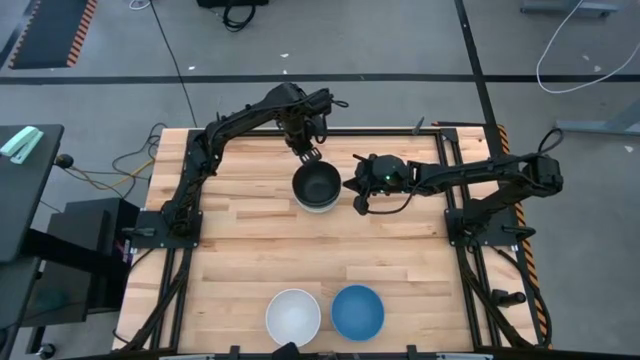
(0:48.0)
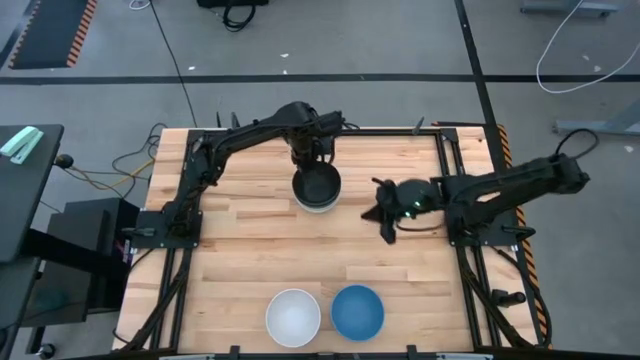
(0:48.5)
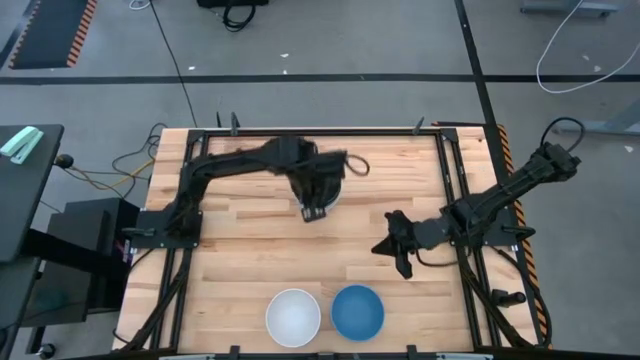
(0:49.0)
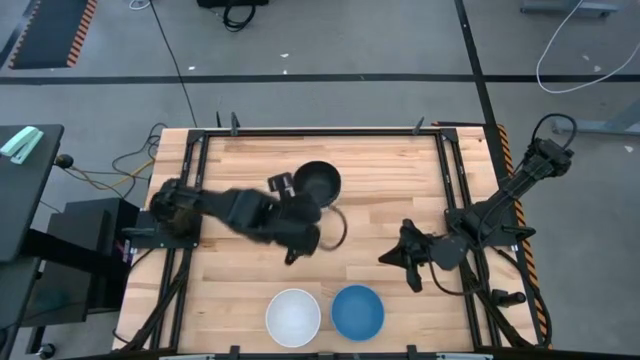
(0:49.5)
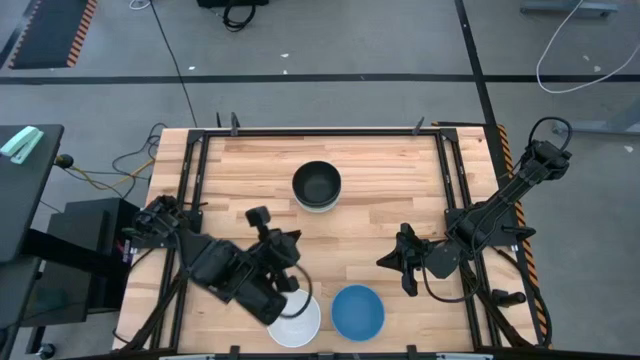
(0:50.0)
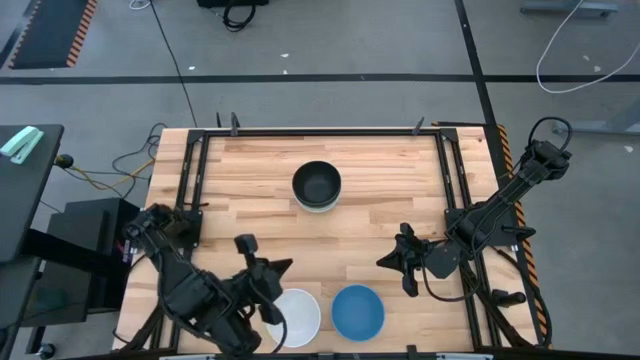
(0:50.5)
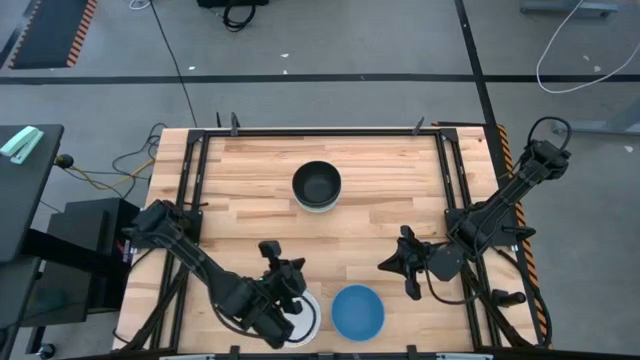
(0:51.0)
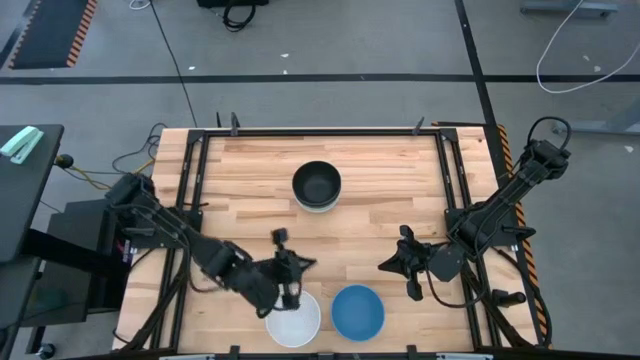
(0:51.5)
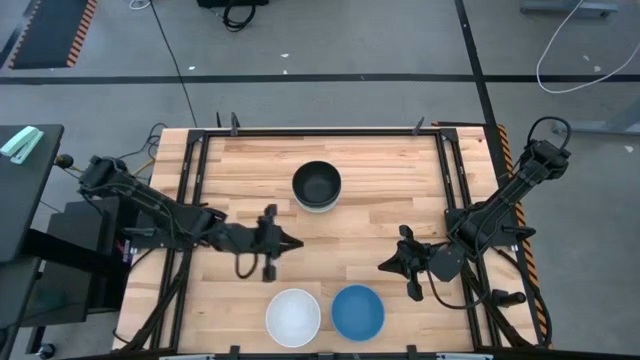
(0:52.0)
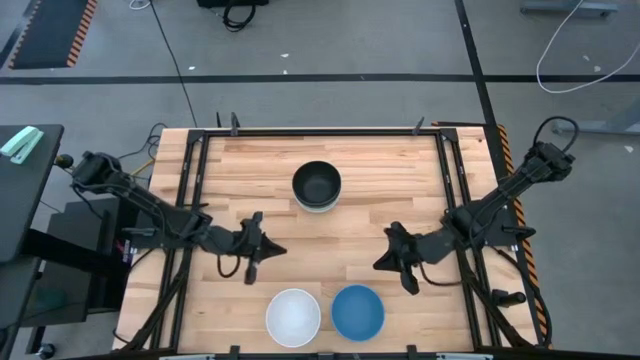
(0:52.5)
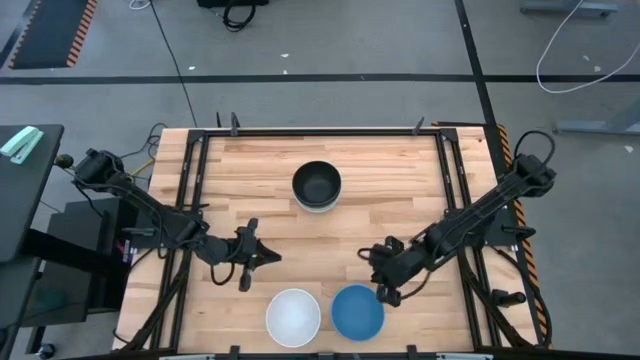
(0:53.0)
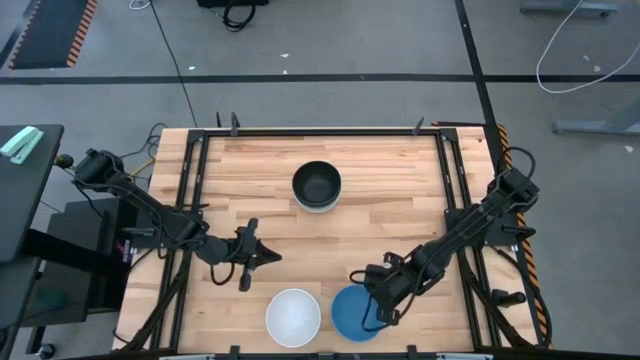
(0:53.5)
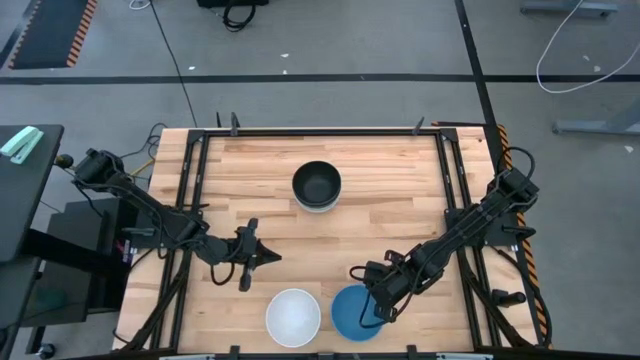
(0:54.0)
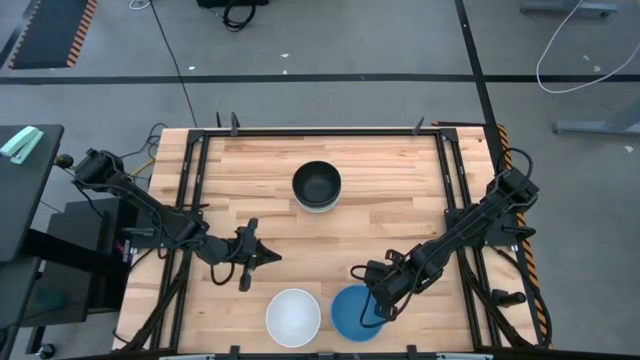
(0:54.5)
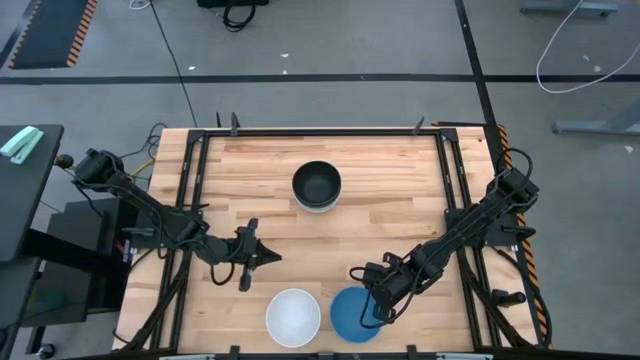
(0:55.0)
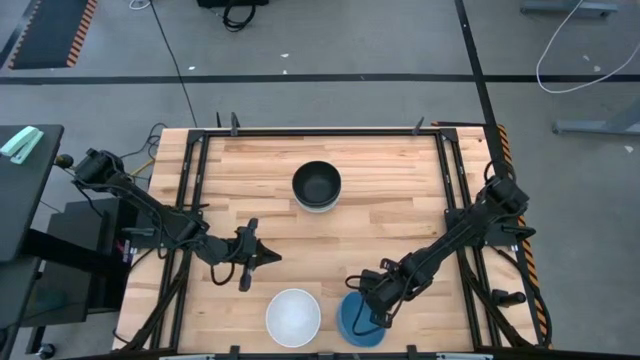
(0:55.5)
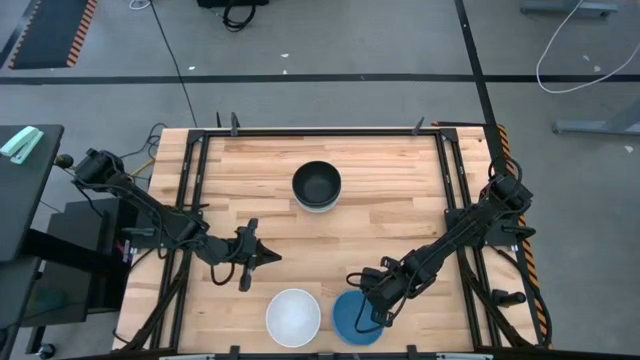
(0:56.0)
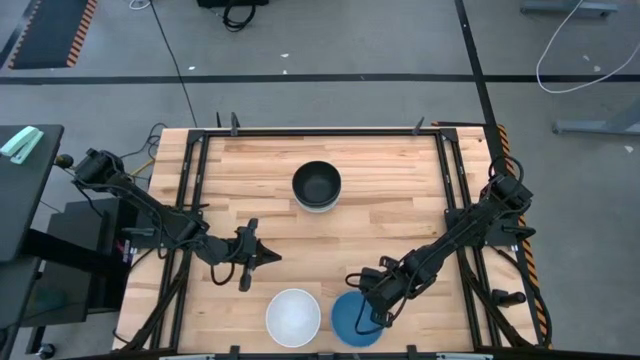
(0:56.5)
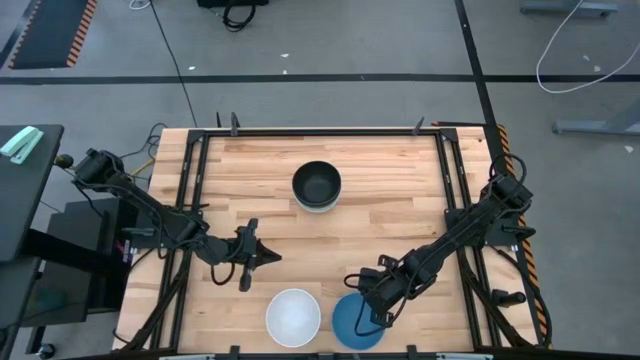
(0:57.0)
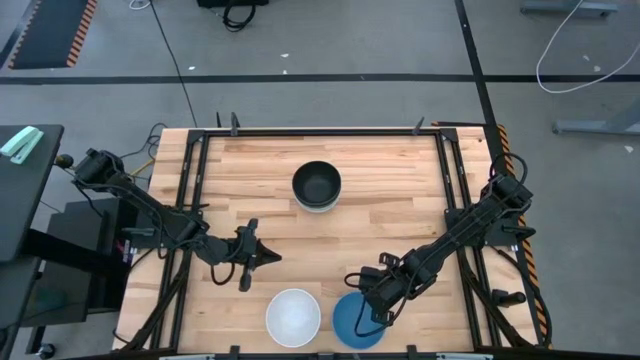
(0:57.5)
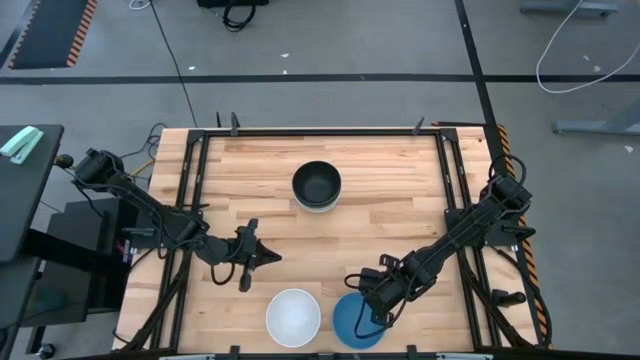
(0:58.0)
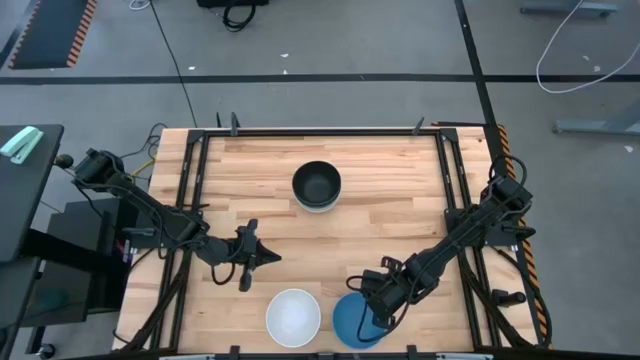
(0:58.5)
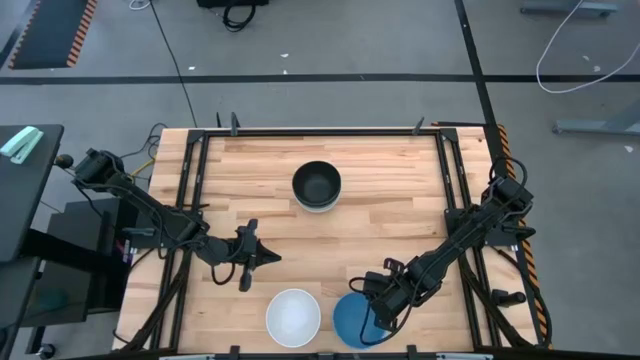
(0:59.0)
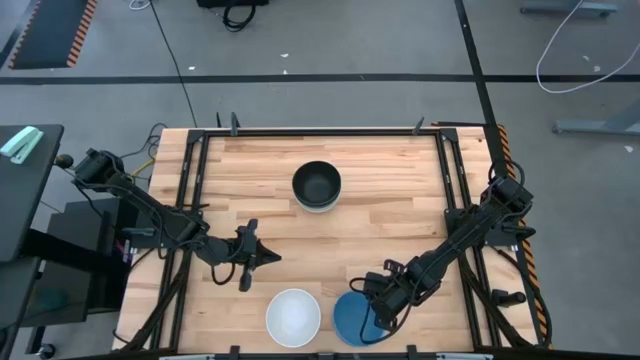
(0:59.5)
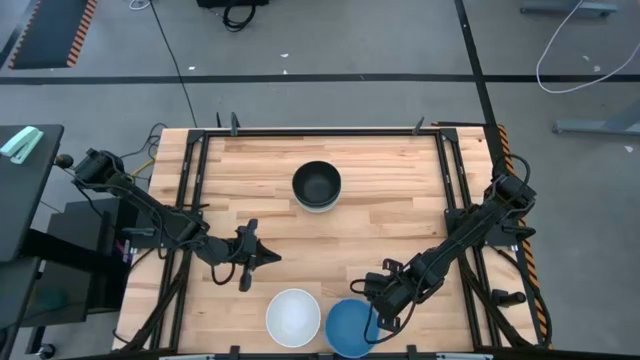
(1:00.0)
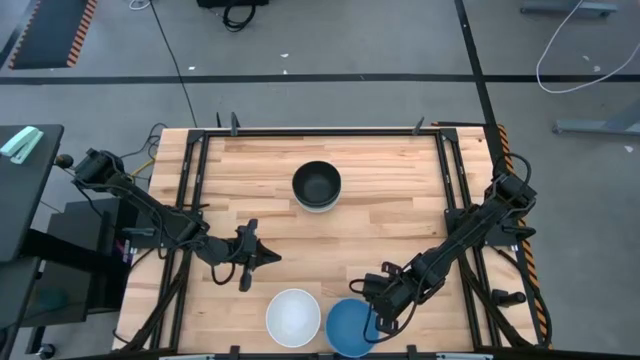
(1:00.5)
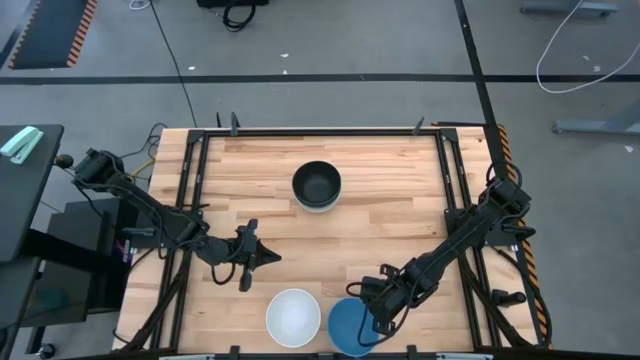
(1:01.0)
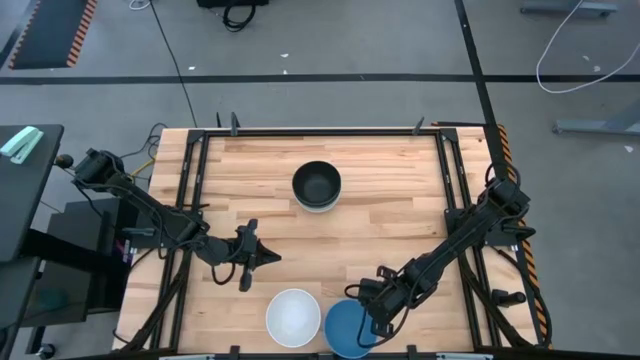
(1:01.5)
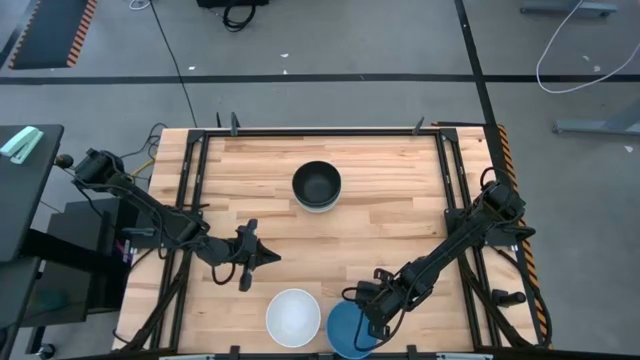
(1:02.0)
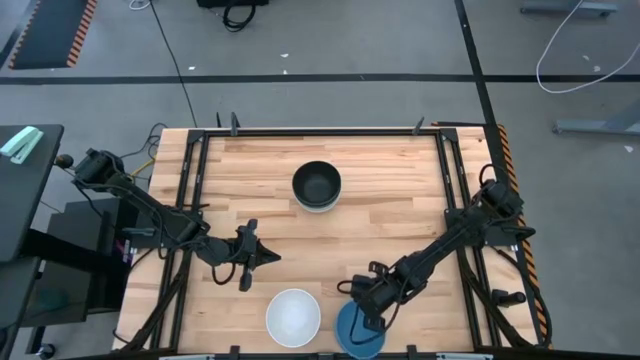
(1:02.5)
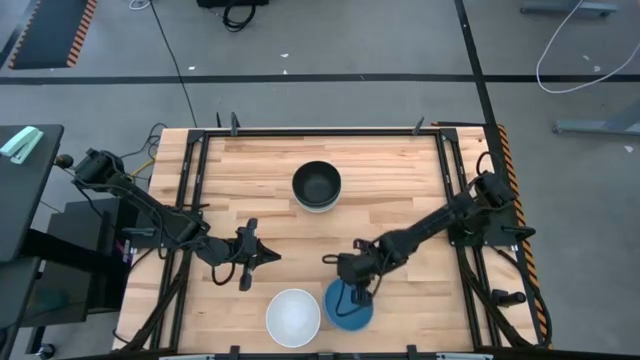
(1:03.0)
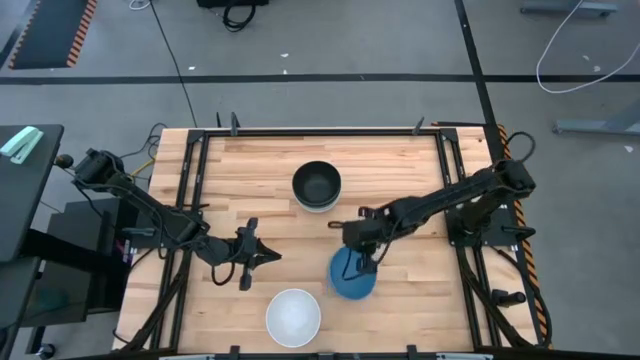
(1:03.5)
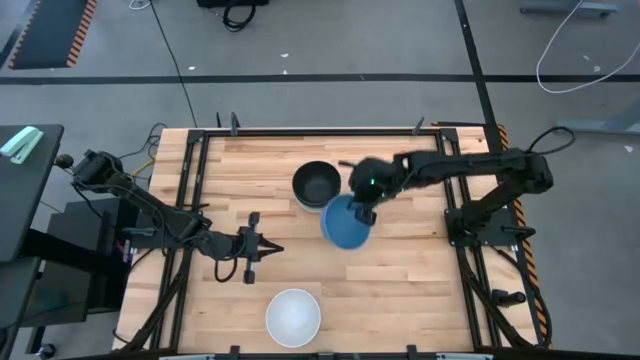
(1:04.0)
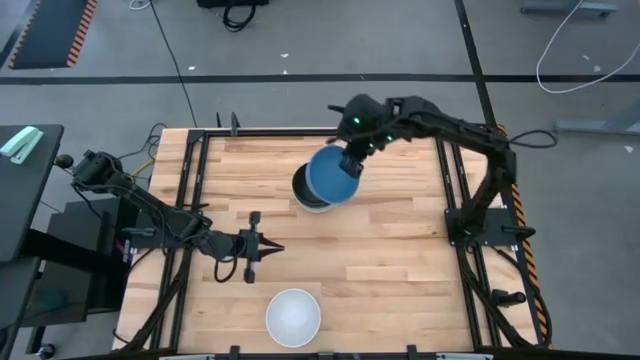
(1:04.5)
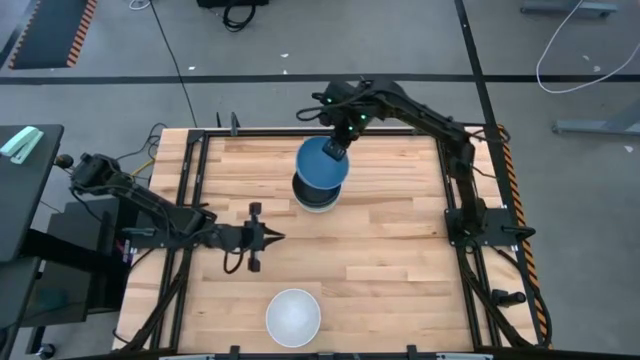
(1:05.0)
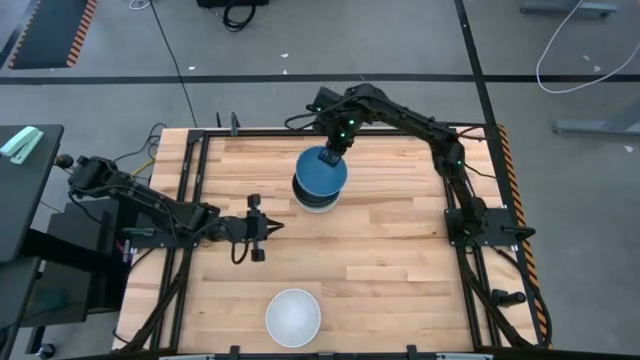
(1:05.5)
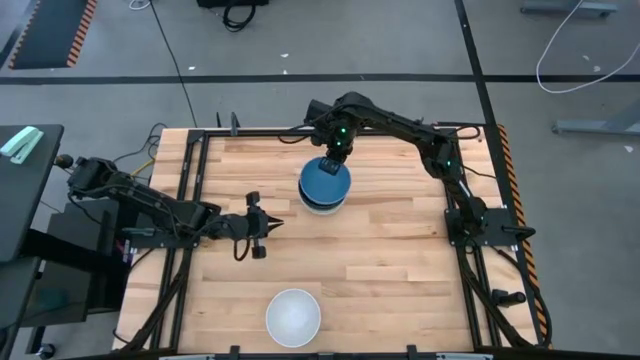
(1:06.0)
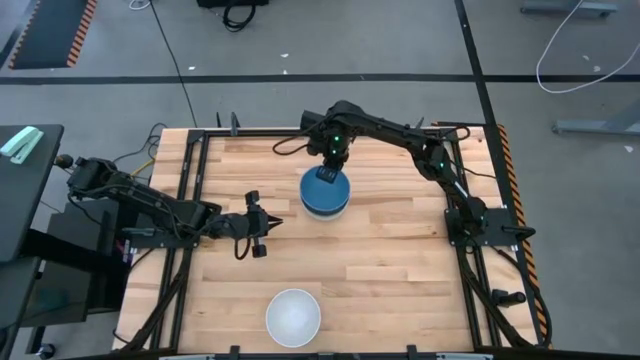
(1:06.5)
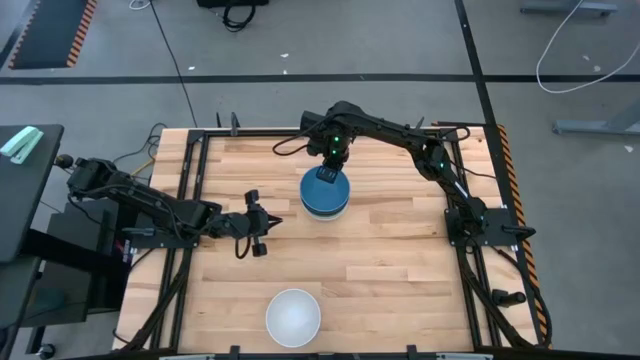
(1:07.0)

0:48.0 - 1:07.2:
Task: Nest bowls inside each other
Stack the blue bowl on top of the black bowl
